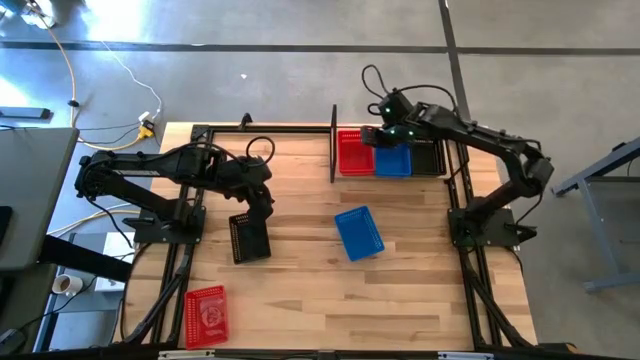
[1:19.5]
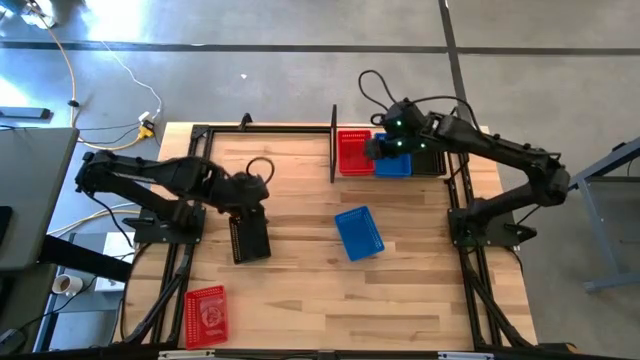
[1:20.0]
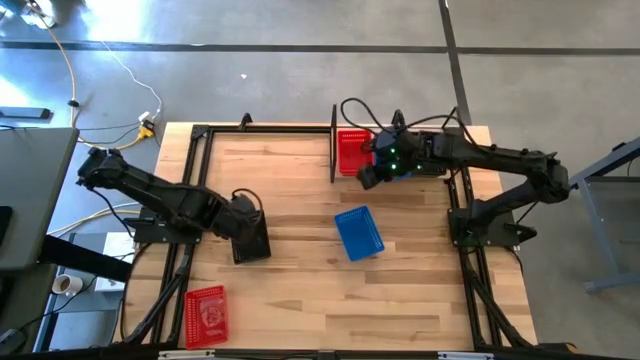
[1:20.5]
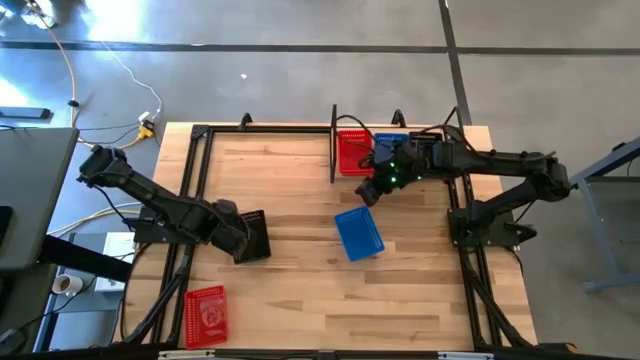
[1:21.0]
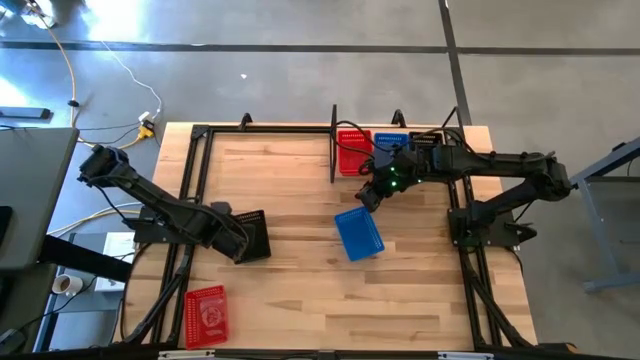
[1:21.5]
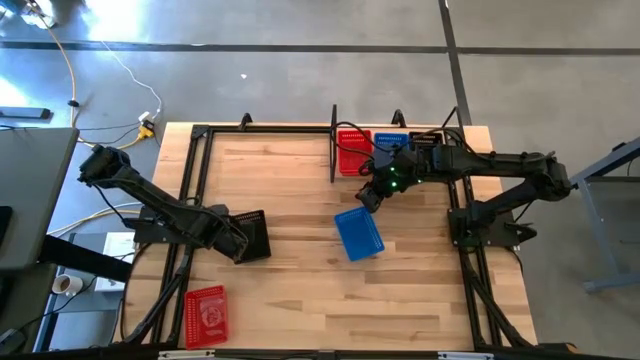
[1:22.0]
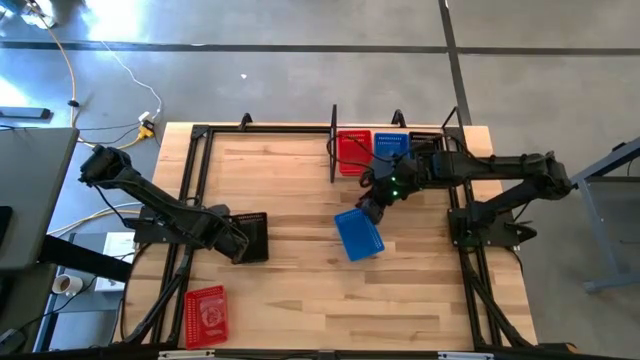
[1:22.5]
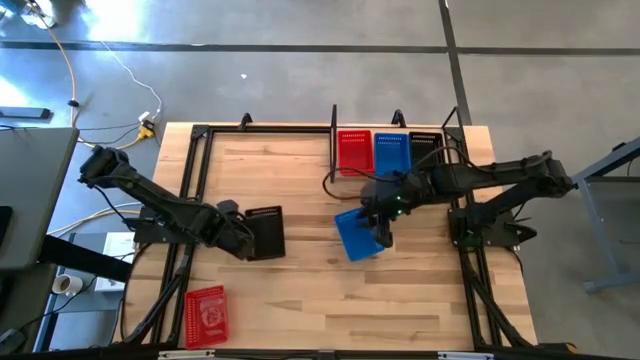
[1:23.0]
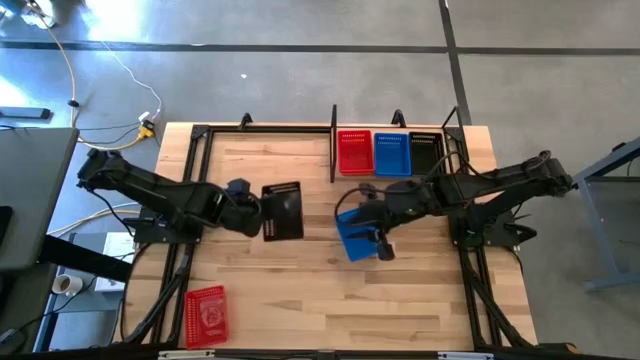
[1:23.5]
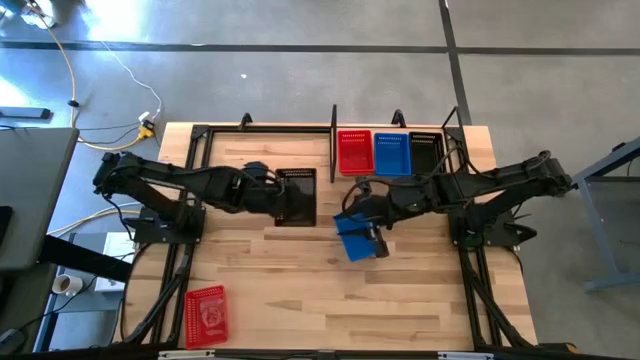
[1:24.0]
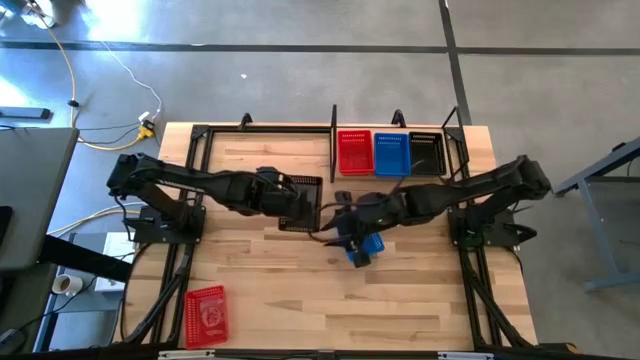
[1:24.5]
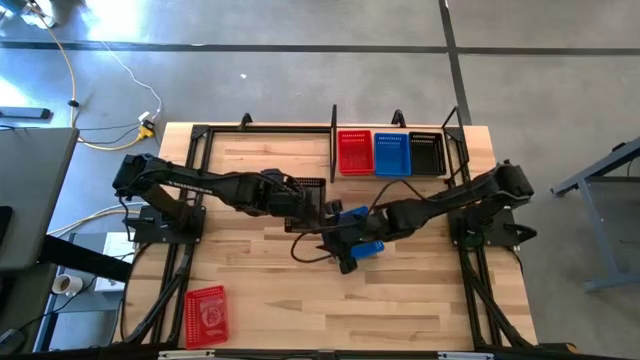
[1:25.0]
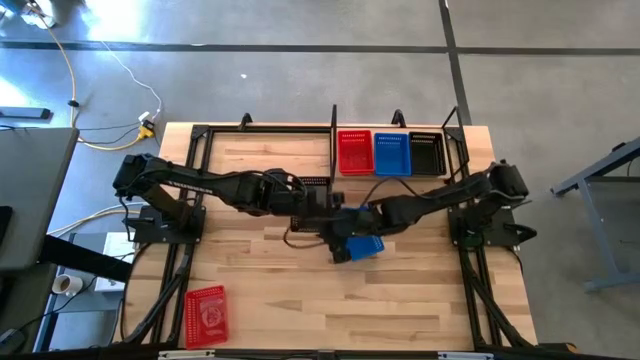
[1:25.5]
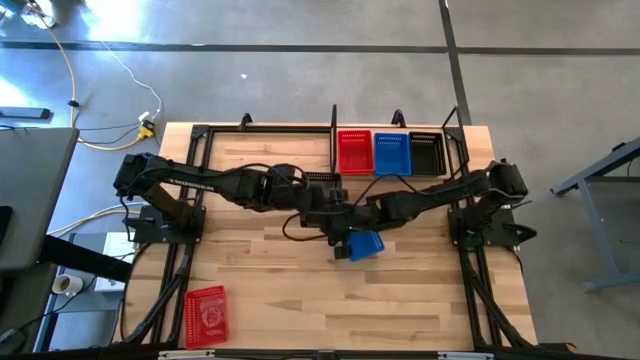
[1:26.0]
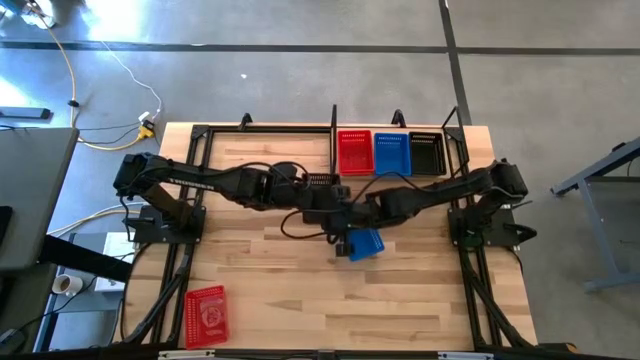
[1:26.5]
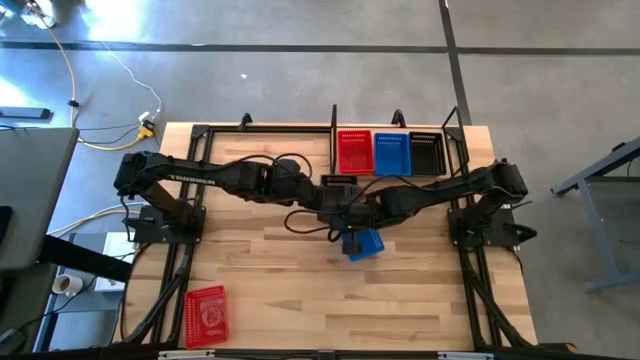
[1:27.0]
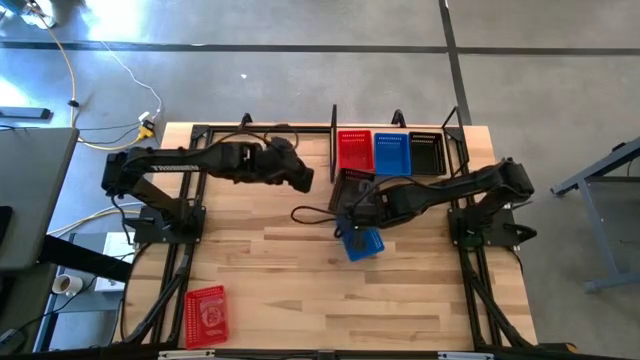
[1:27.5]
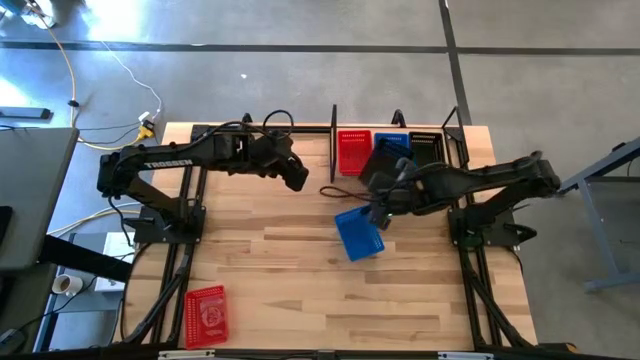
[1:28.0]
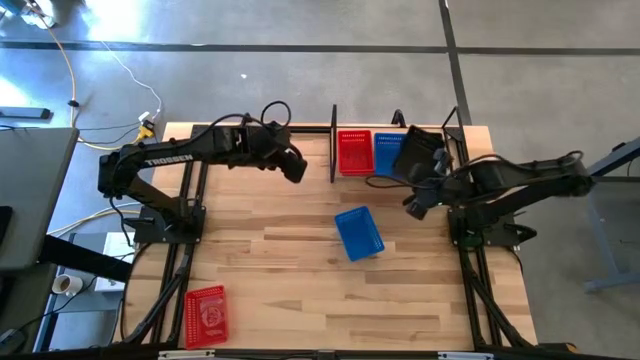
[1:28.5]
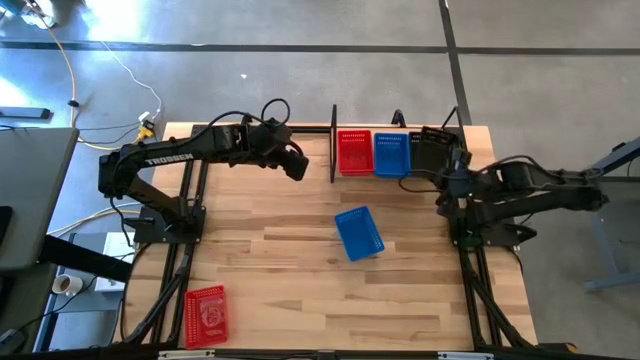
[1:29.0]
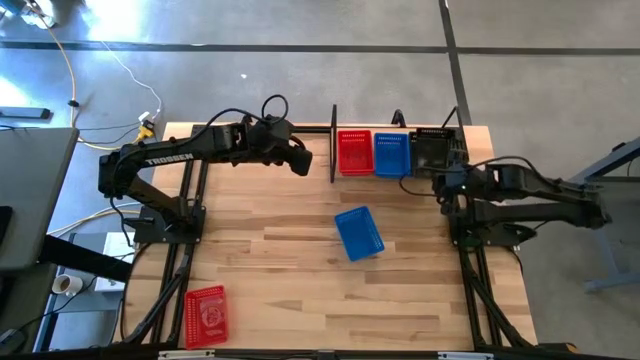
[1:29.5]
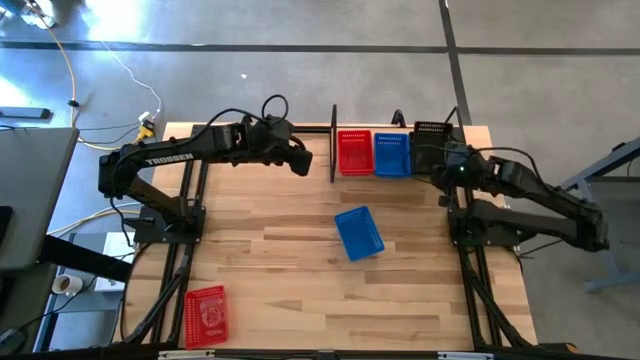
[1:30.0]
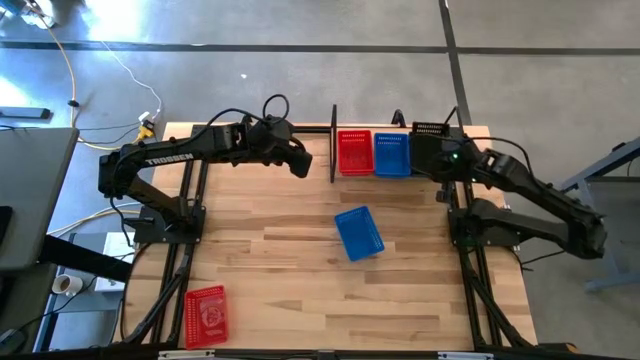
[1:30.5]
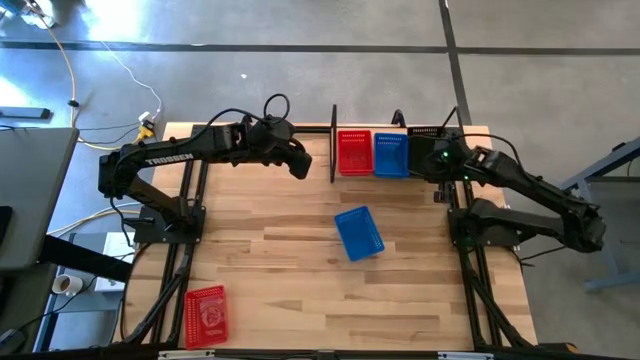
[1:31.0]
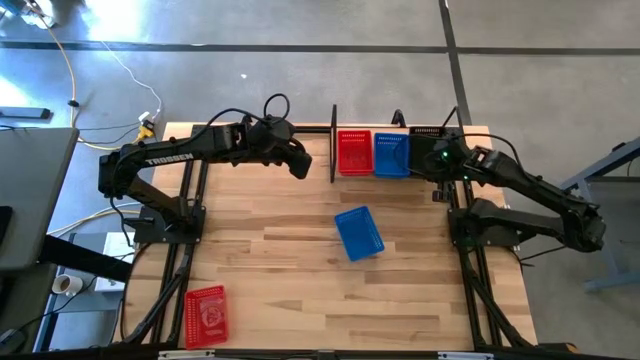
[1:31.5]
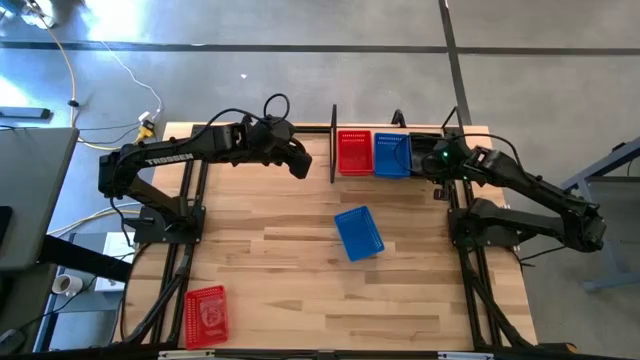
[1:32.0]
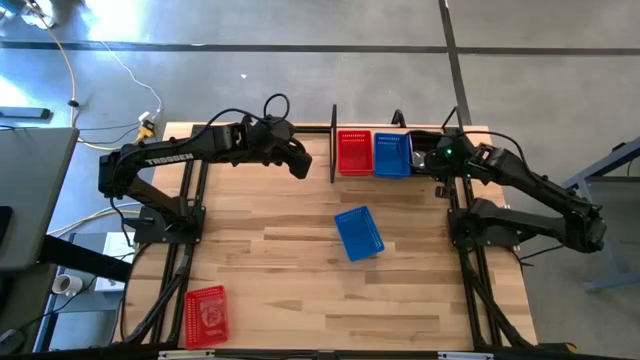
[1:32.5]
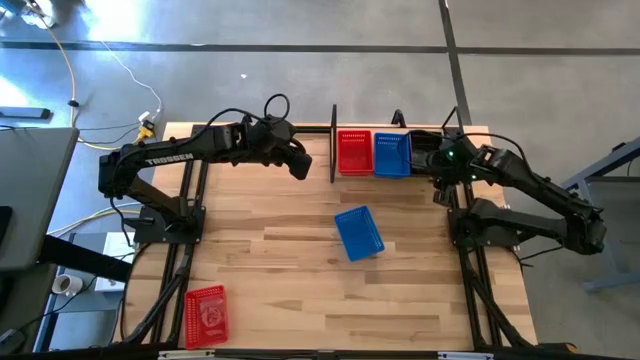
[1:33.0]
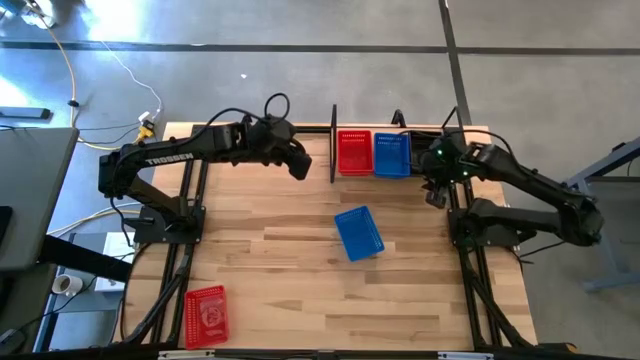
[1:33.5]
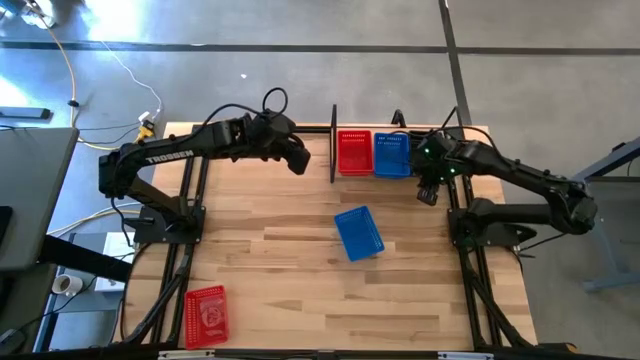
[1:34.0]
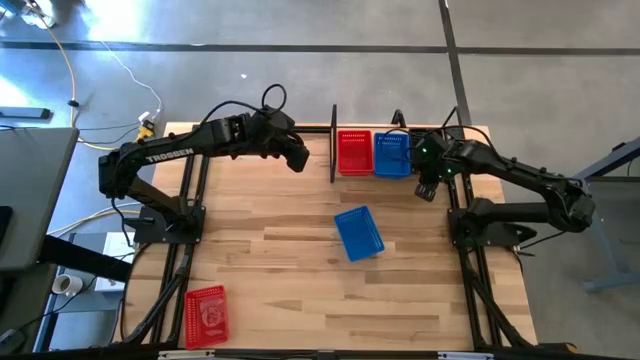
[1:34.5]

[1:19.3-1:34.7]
Task: Stack baskets on shelf by color
Stack the black basket on the stacked black baskets on the shelf

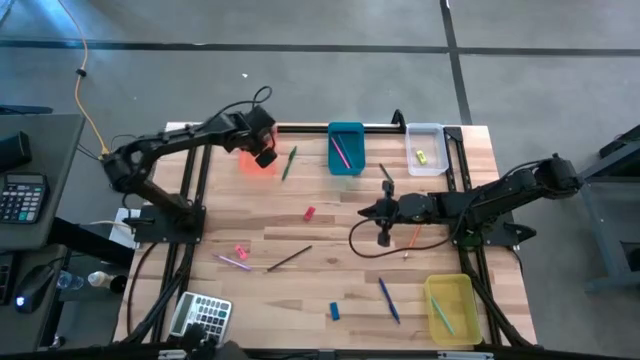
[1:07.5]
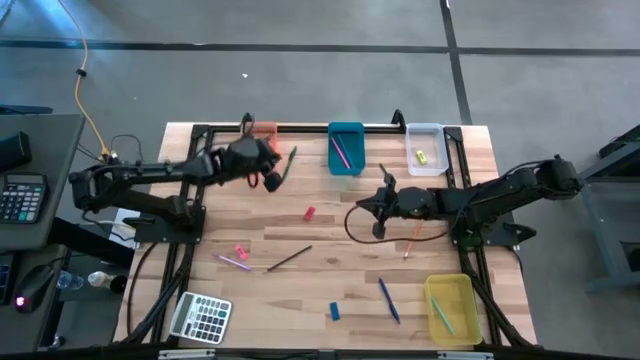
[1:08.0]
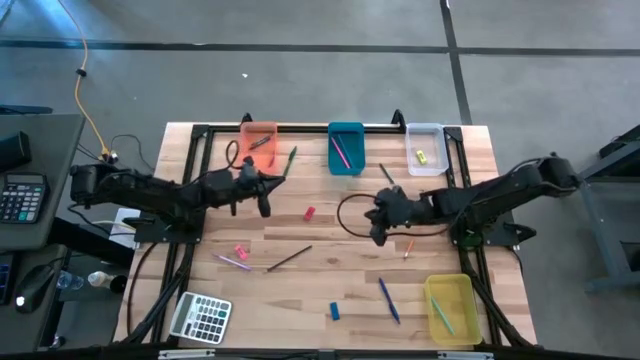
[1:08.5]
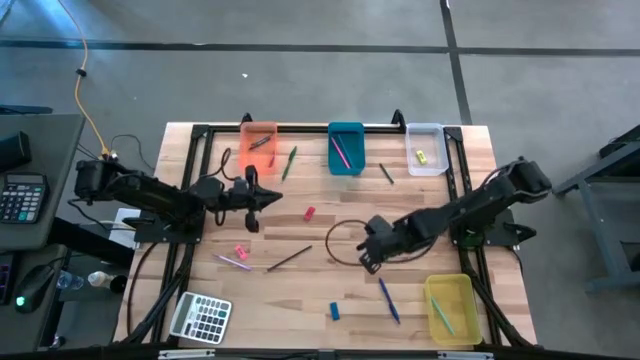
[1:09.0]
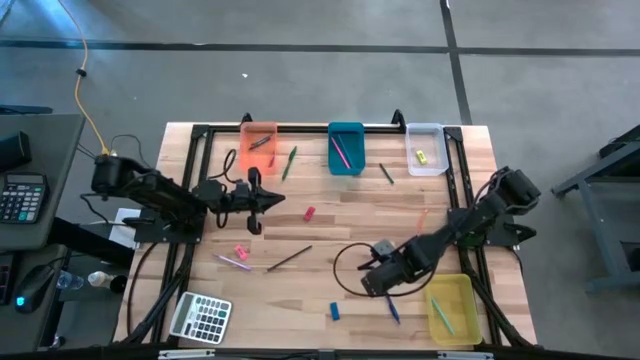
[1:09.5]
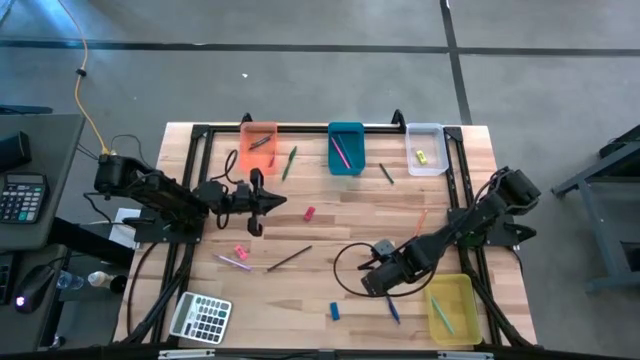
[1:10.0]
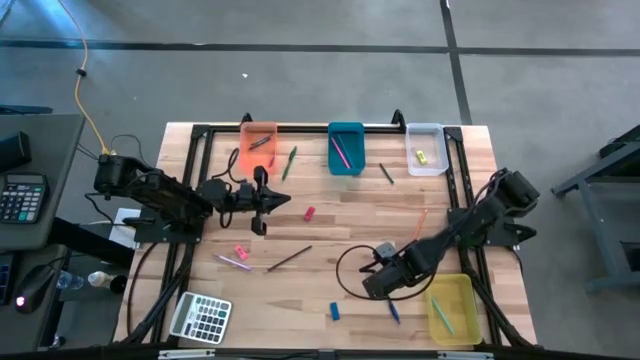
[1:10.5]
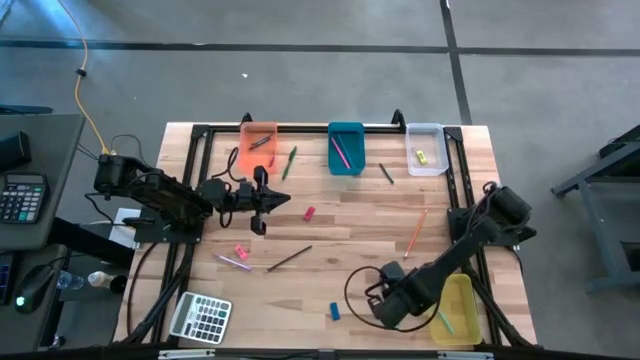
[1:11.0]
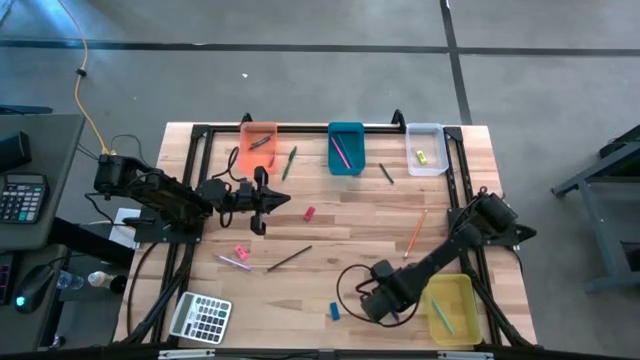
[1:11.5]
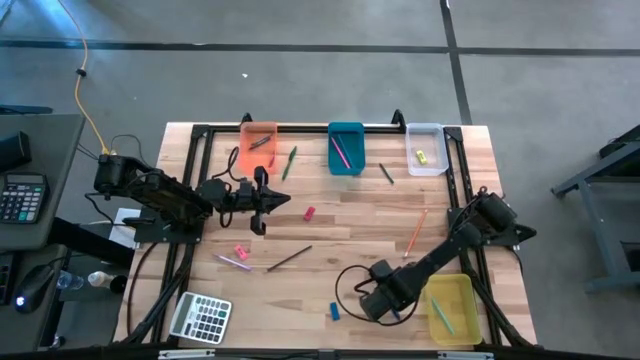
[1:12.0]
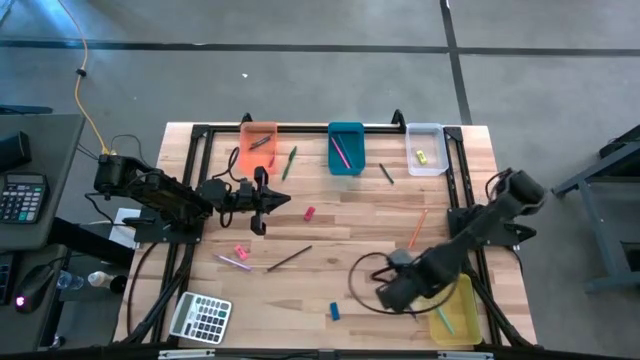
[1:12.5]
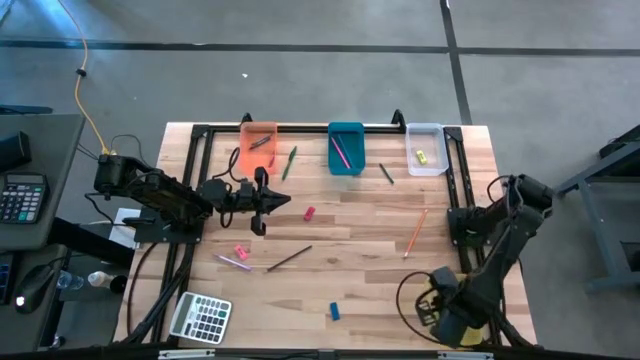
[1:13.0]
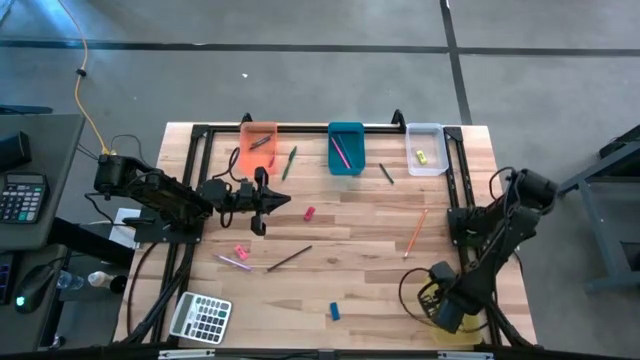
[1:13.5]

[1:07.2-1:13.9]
Task: Sort crayons/erasers/pens/pencils in bins
Put the dark blue pen into the yellow bin
